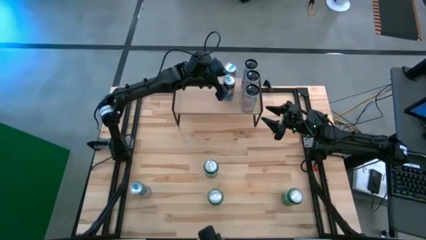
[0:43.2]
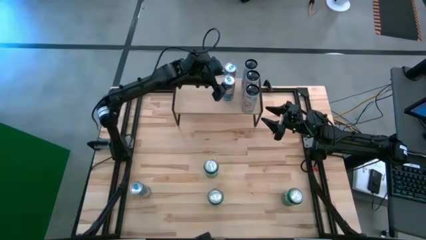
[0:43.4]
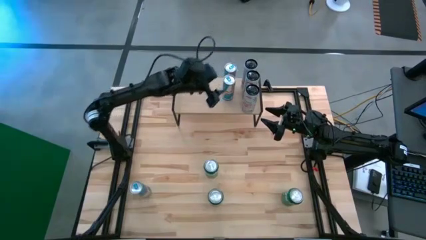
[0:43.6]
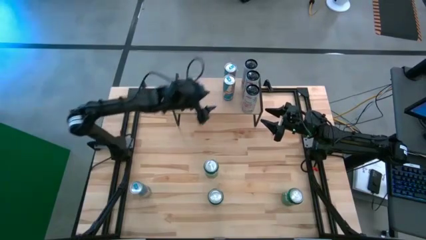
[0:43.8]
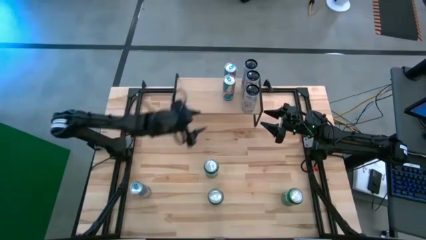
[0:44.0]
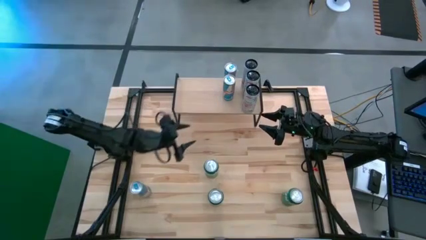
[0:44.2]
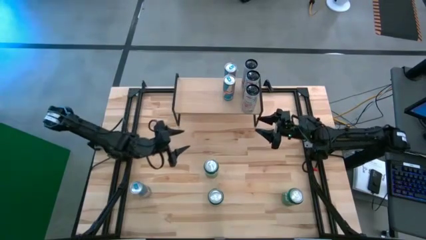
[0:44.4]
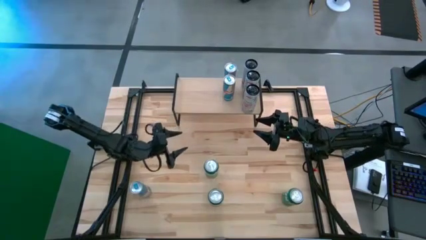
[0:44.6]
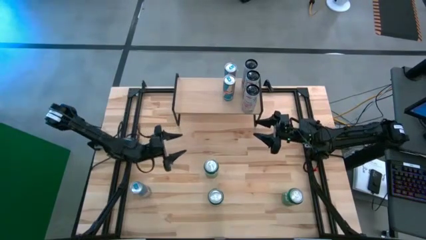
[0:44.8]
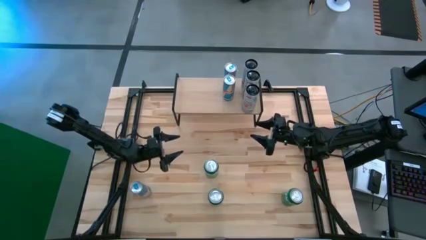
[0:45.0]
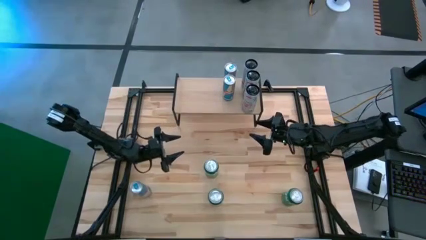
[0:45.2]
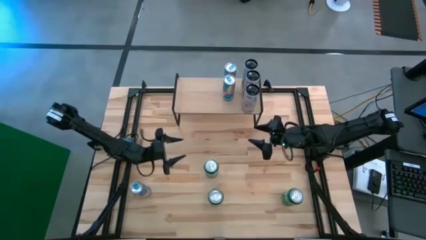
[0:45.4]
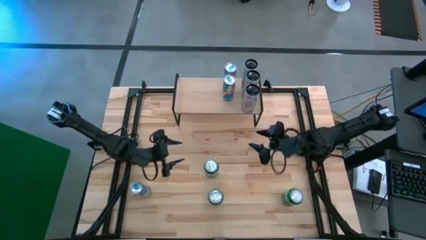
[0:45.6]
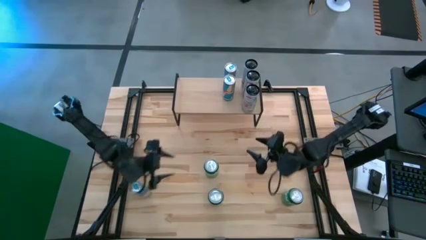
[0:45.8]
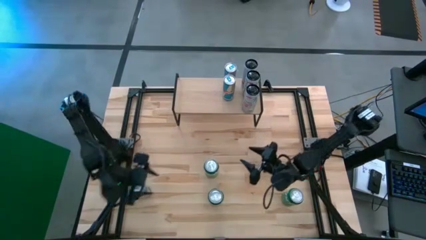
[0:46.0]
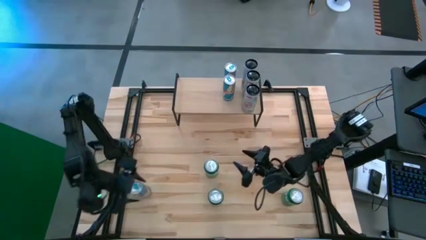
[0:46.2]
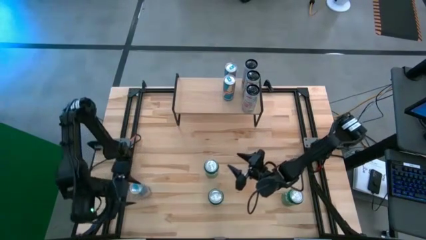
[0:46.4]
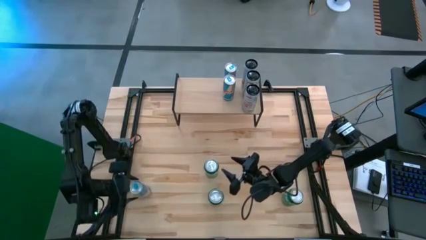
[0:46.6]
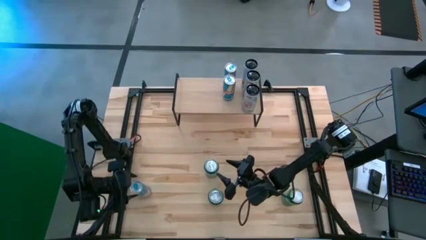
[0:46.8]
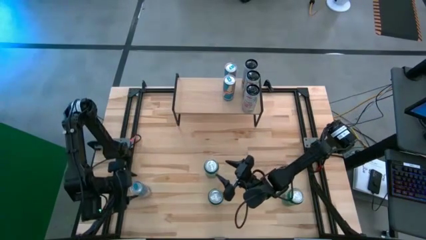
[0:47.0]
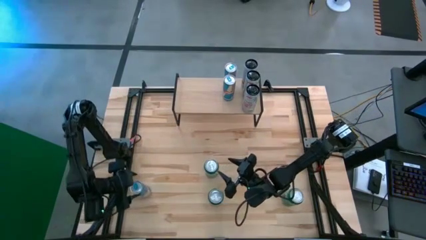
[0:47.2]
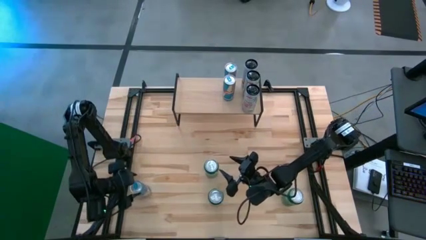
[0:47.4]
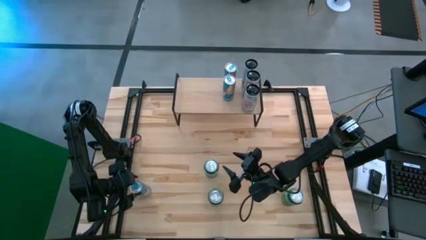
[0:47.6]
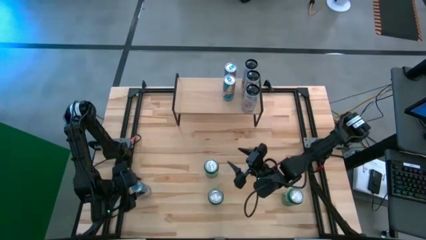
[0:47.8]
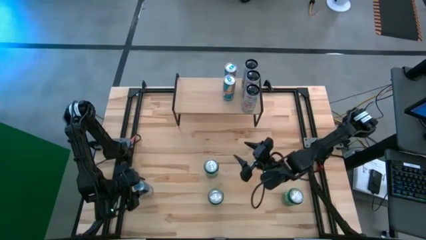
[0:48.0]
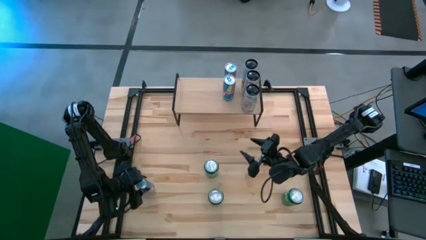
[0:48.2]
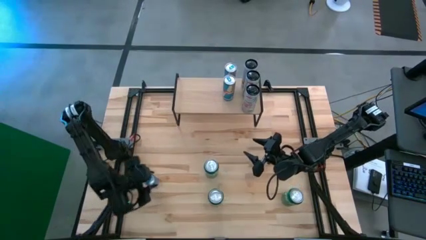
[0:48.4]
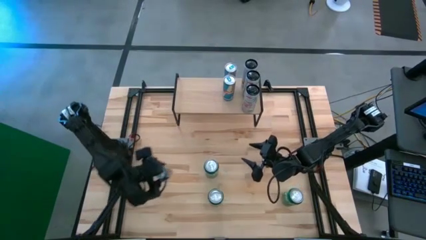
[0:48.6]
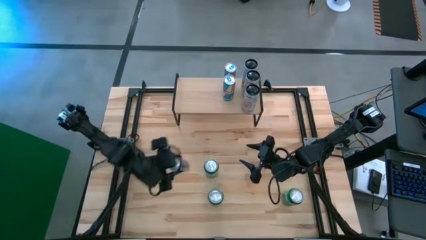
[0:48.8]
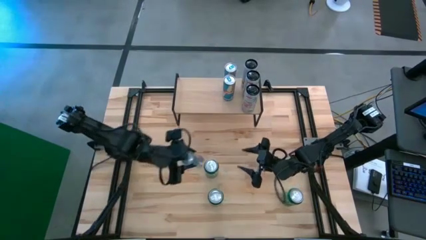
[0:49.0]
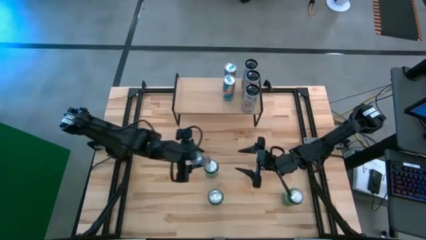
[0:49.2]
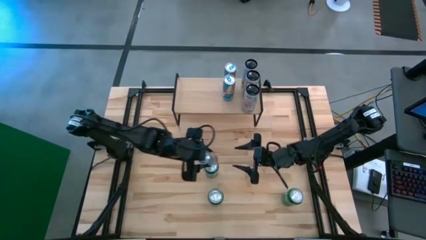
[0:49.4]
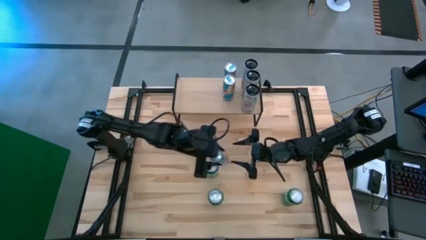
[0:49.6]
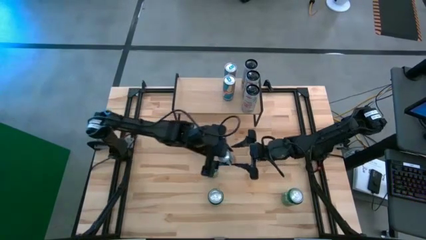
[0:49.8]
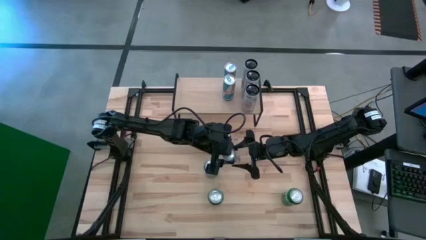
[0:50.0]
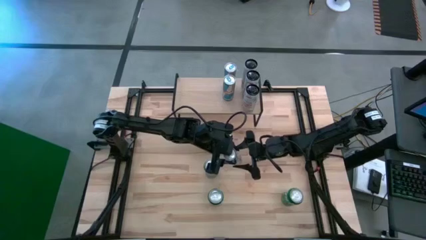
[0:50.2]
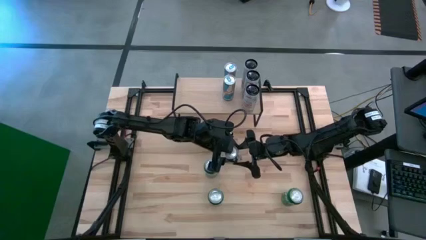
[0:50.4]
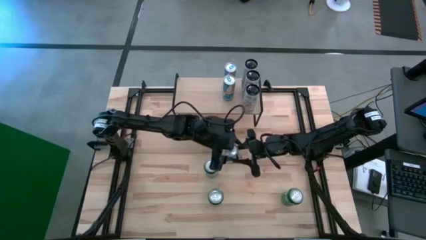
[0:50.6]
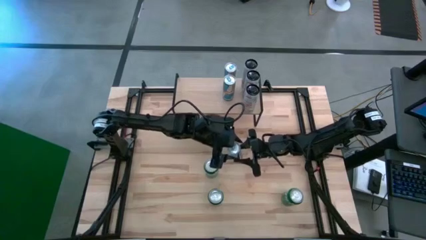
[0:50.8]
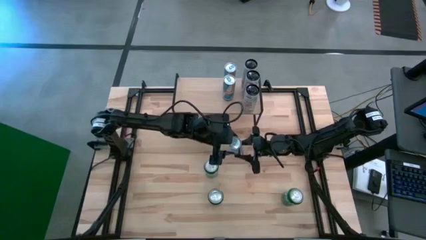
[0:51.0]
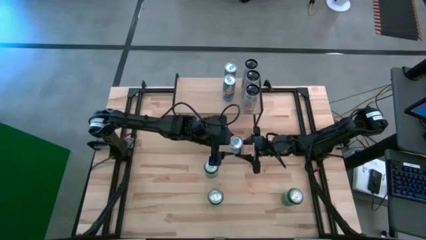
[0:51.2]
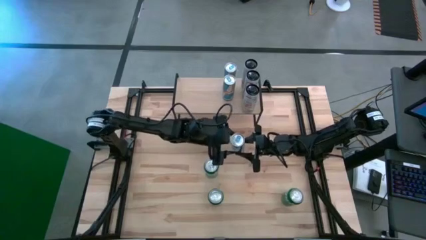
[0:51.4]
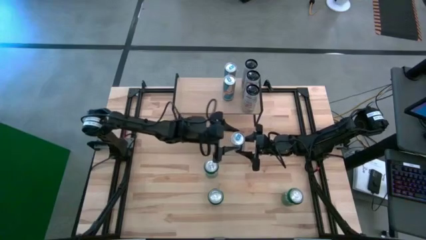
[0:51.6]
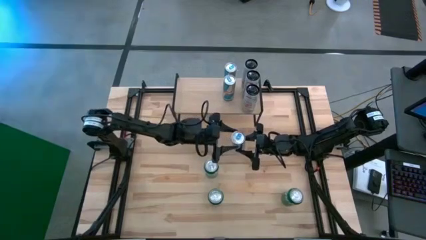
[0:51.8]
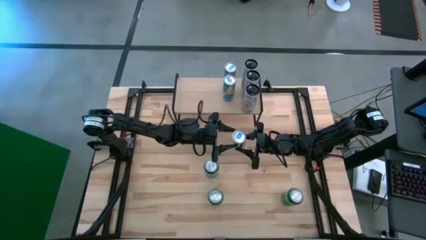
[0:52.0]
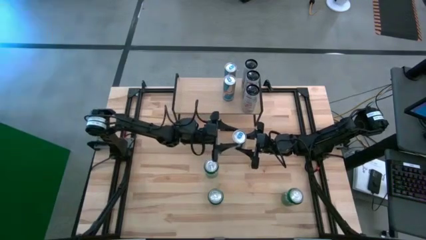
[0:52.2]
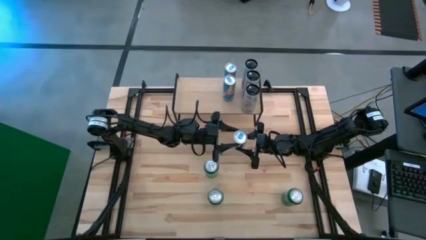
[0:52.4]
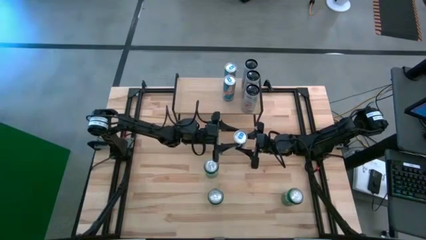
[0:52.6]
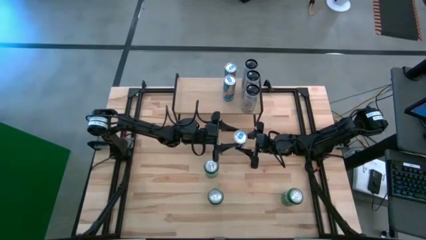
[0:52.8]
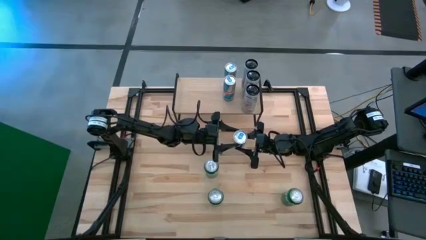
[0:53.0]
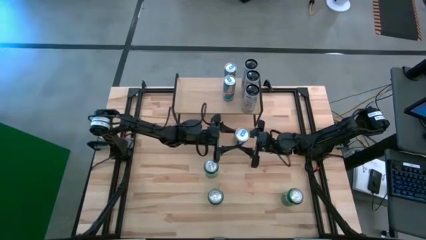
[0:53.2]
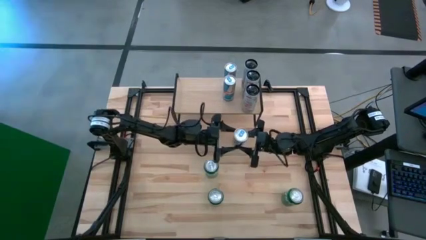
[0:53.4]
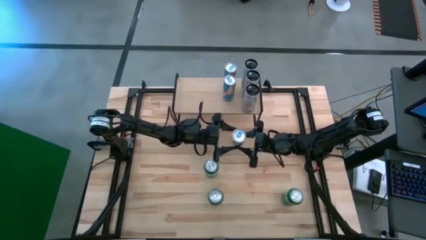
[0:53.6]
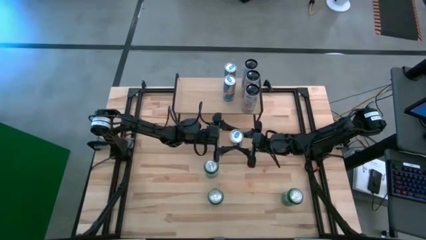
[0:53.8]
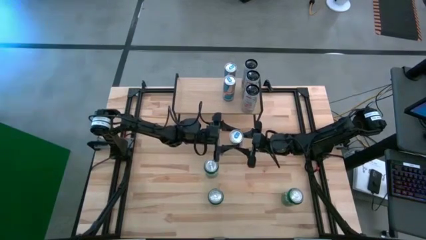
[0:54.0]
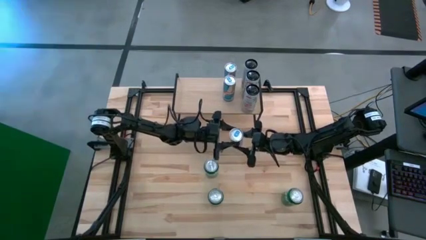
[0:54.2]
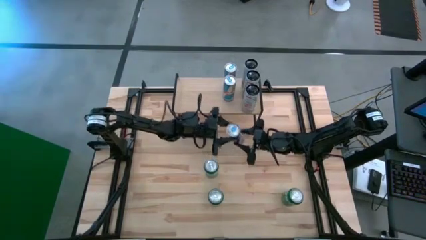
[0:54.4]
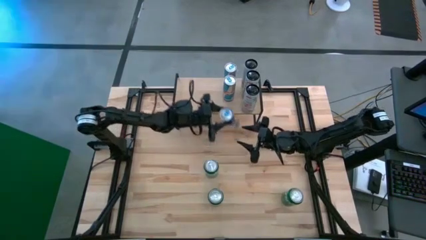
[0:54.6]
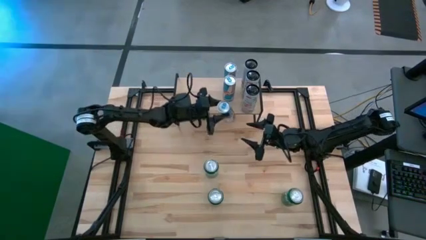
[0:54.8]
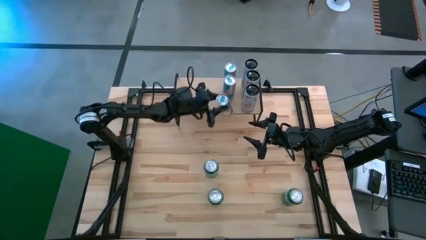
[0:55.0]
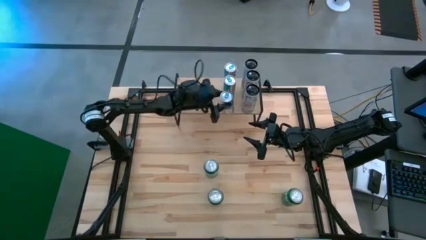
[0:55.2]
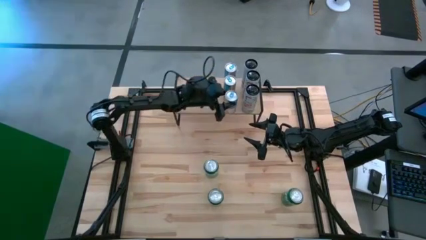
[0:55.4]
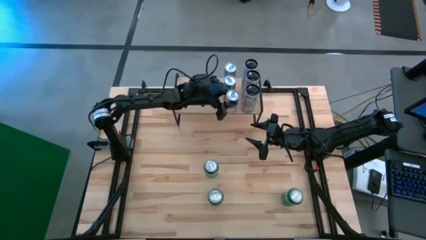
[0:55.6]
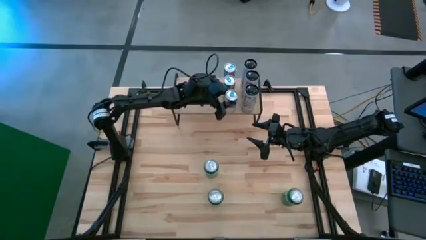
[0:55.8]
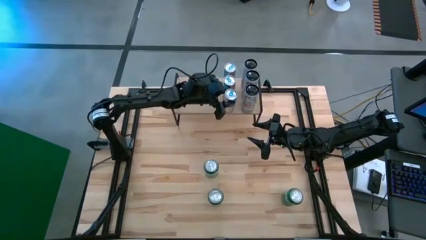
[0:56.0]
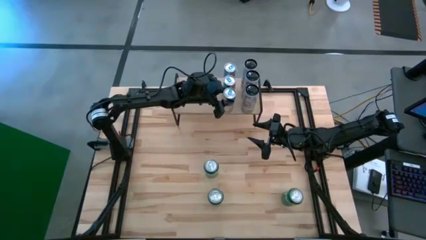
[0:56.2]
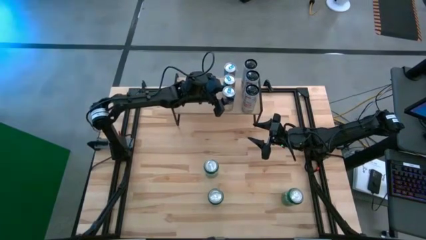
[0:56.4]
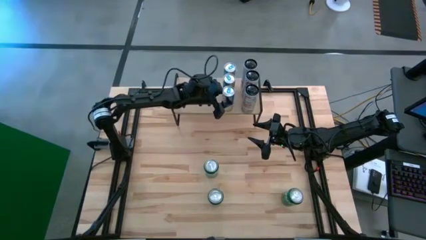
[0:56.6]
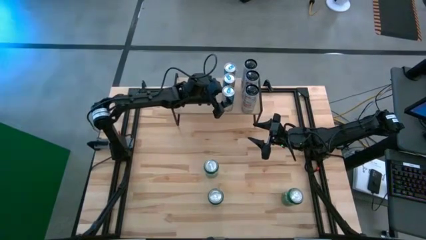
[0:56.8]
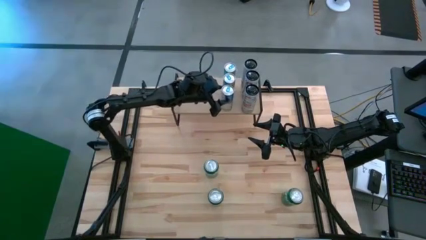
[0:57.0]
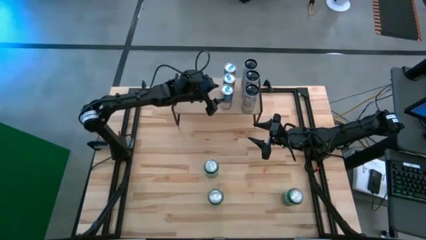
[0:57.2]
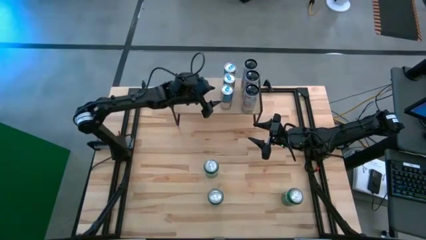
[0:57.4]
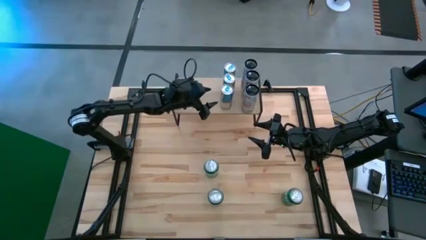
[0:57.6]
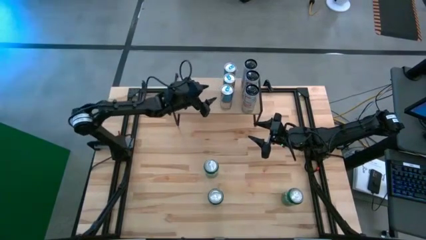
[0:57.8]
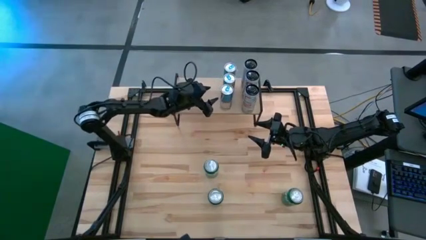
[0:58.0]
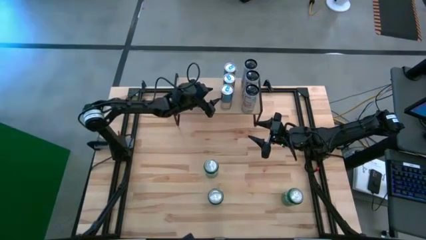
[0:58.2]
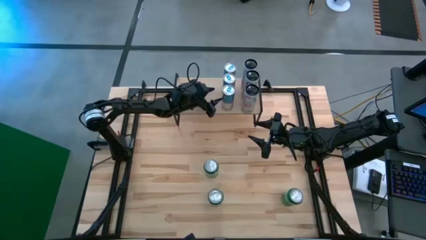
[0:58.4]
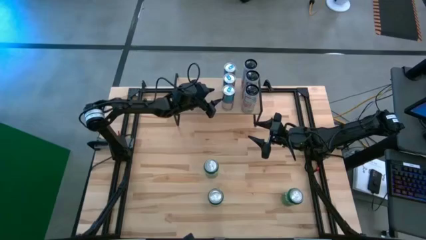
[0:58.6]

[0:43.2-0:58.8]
Task: Place canned beverage on shelf
Put the blue soda can on the shelf aligned with the other blue soda cans
